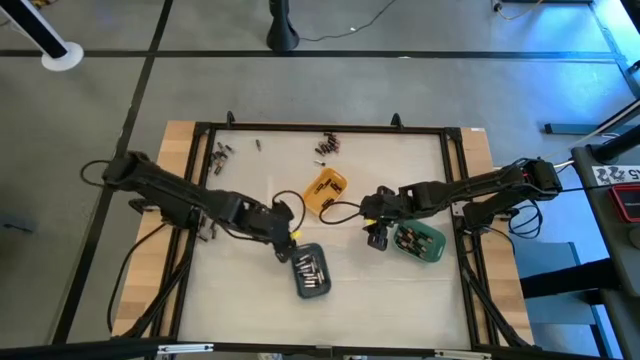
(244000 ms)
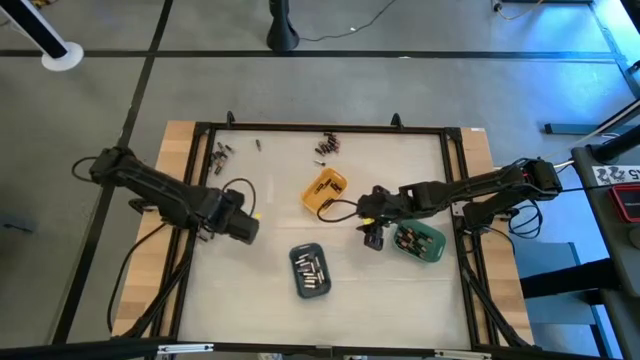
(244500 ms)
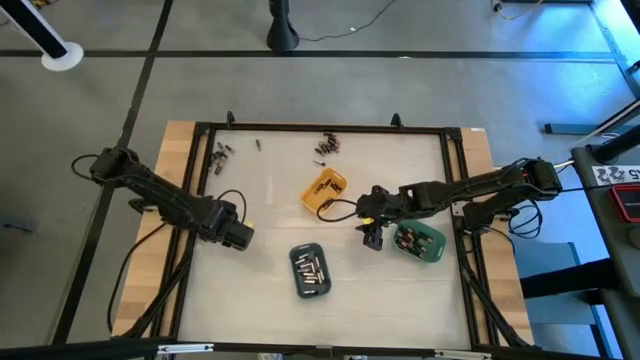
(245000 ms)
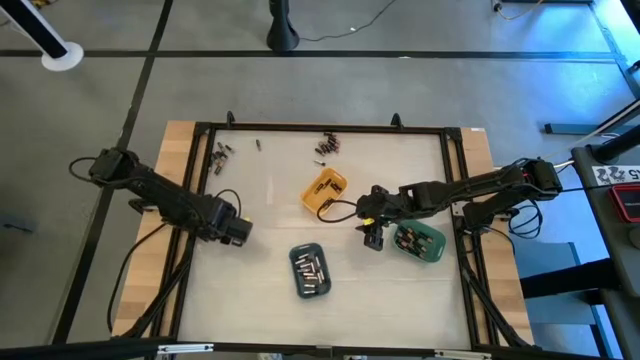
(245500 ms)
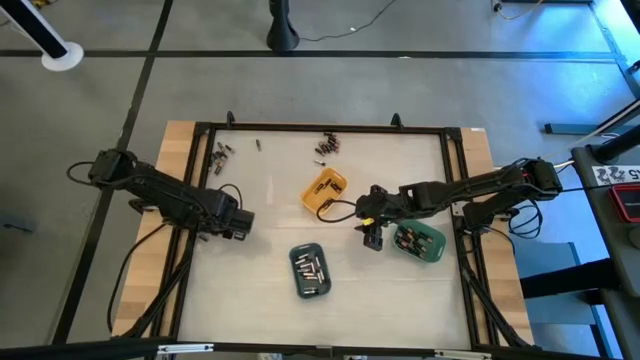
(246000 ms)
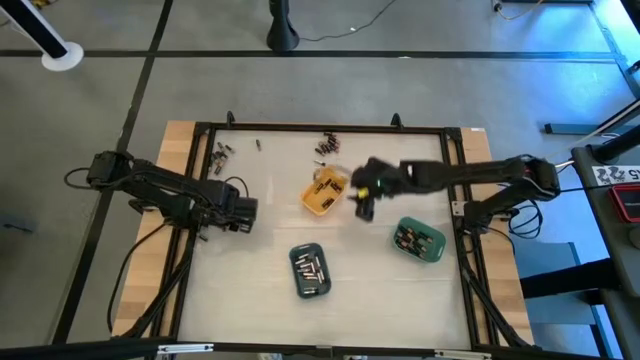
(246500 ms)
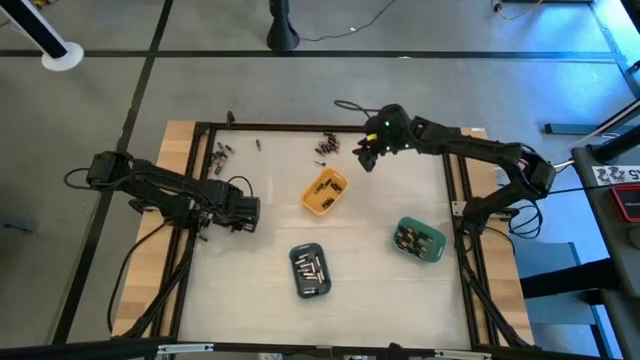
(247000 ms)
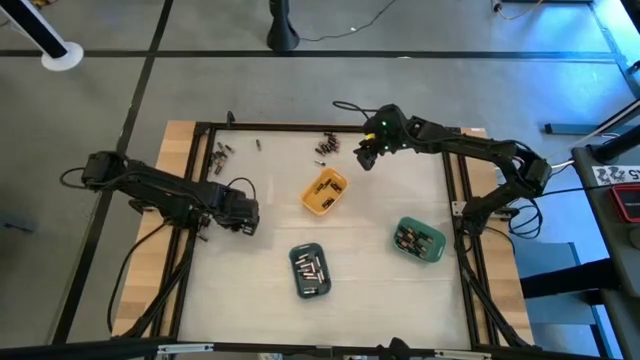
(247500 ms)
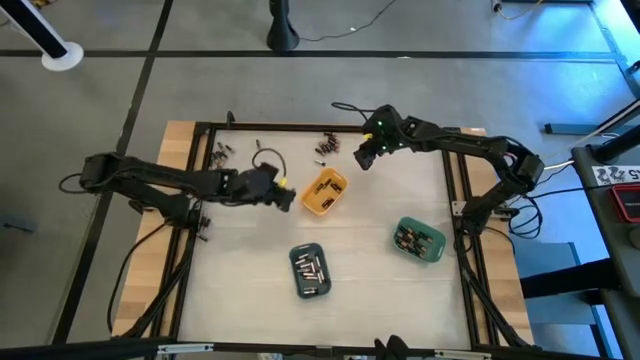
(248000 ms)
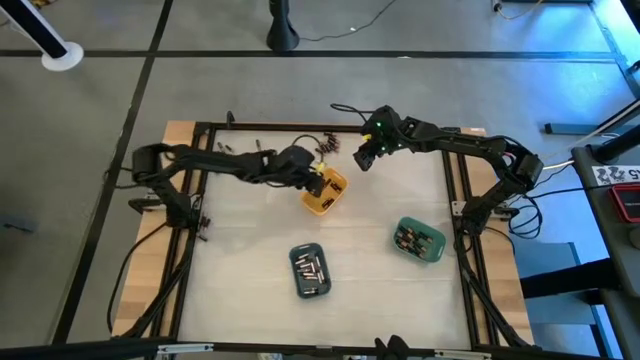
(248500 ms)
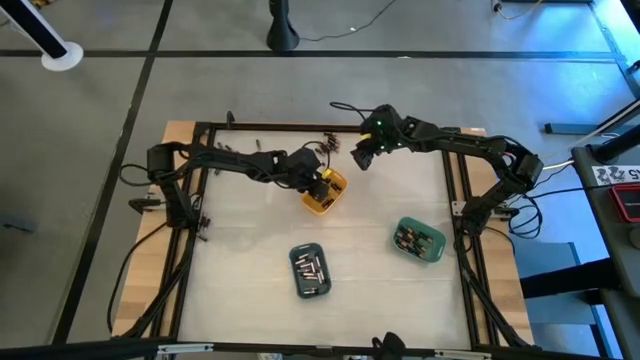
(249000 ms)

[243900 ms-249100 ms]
Task: Sort batteries
Put the black battery into the yellow bin

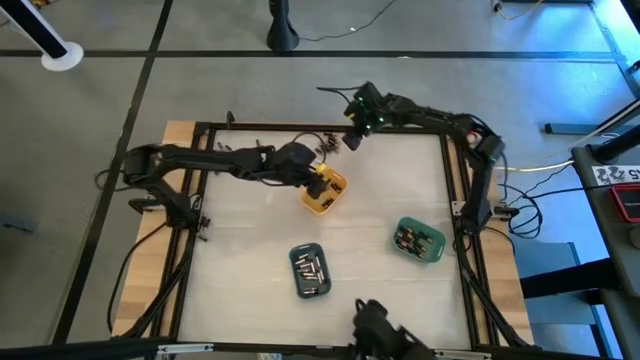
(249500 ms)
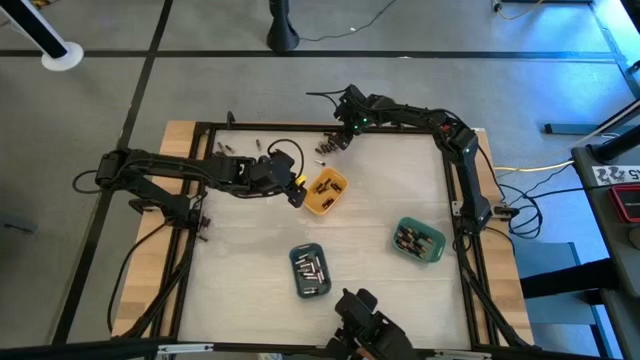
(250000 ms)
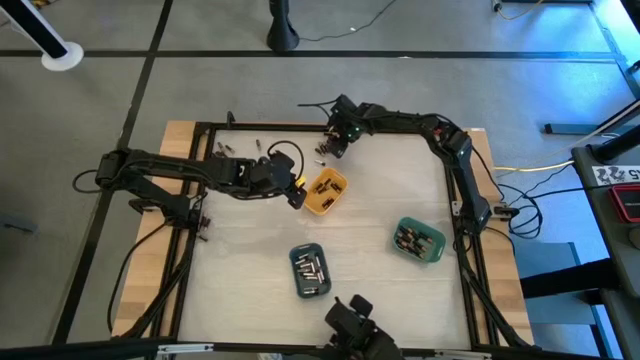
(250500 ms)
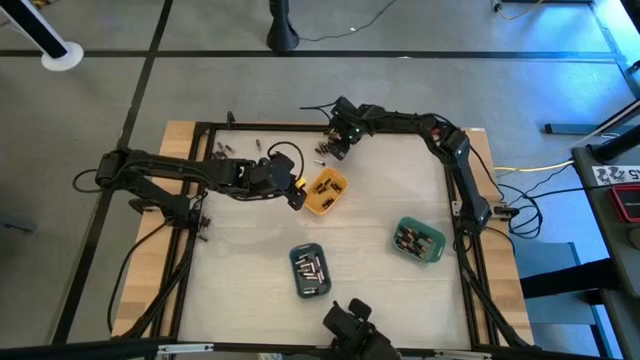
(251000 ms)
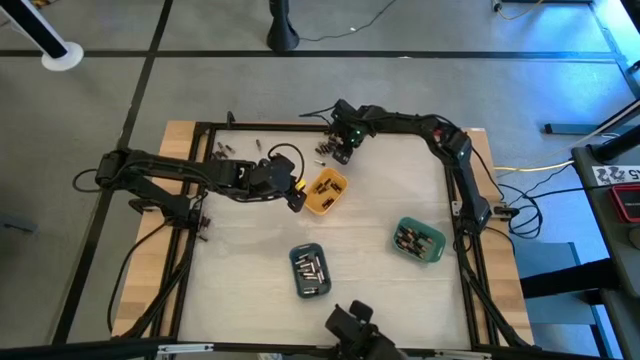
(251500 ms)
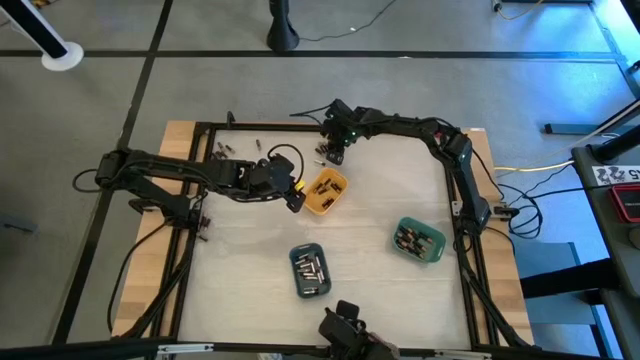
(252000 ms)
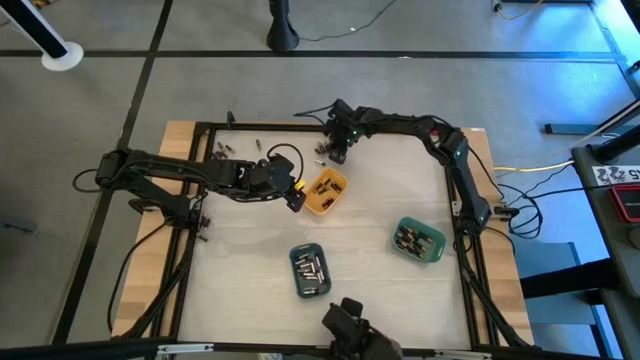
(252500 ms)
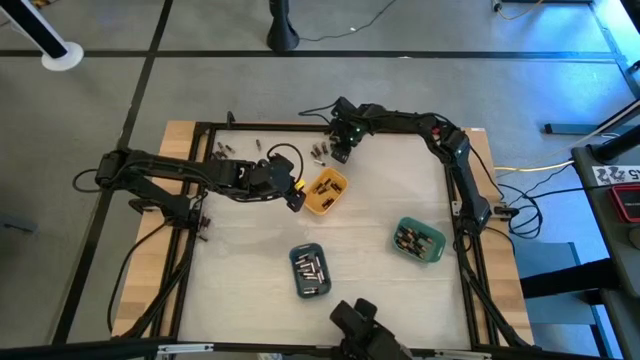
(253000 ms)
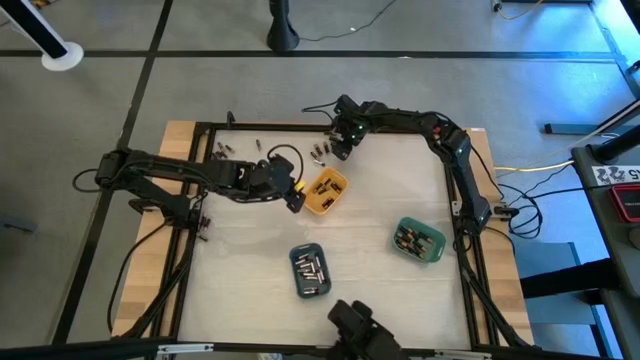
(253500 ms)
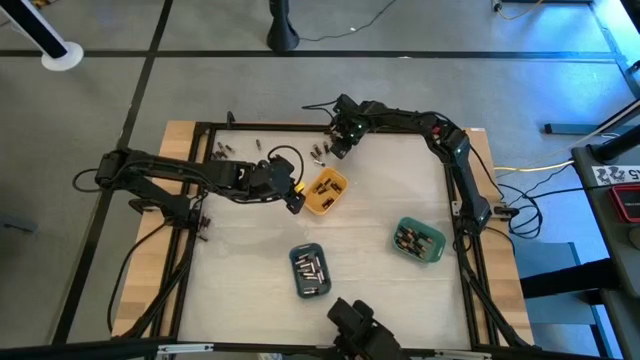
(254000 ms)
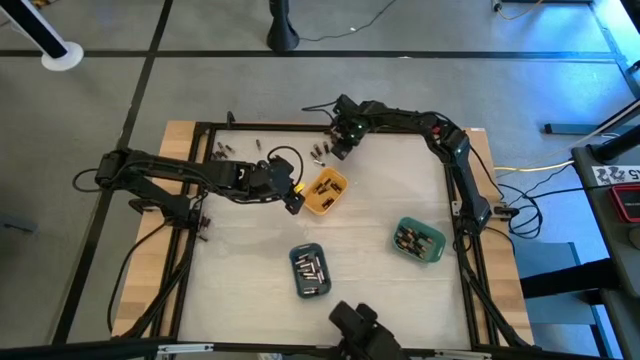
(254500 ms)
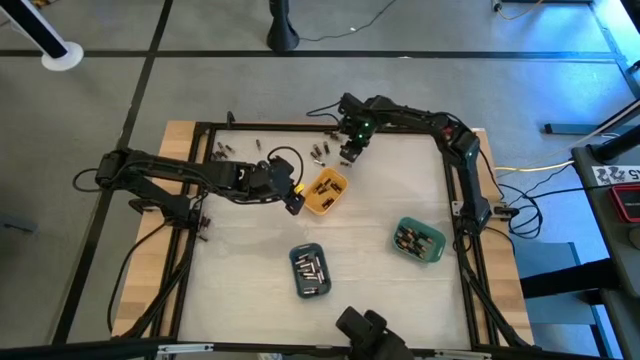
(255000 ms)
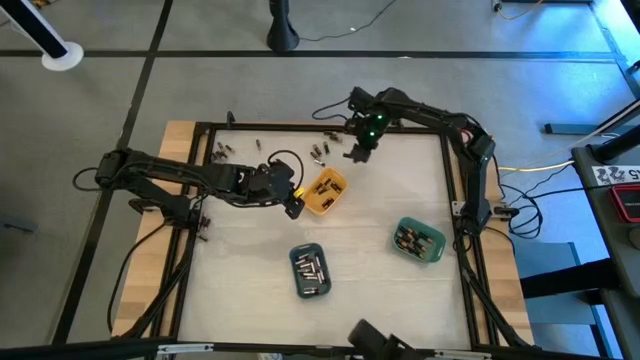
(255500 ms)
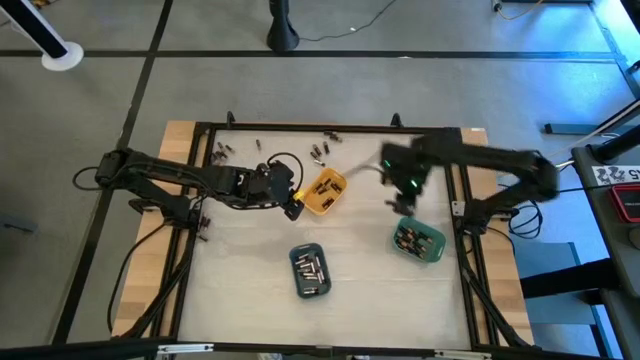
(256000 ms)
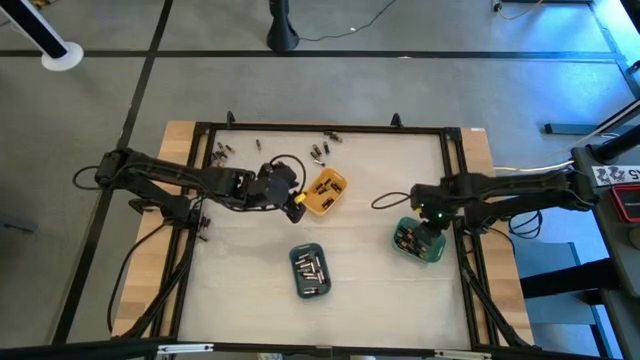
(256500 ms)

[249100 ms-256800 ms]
Put the black battery into the green bin

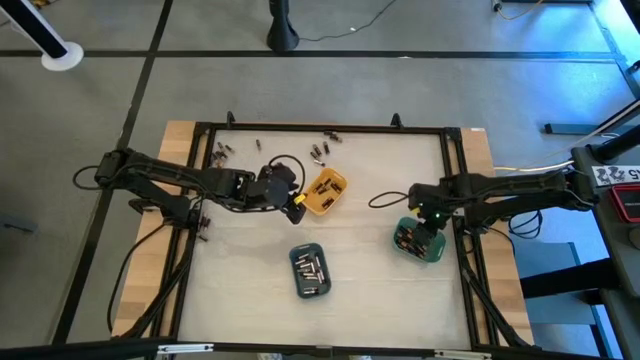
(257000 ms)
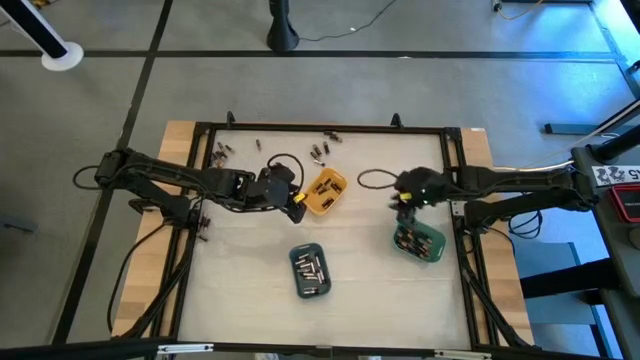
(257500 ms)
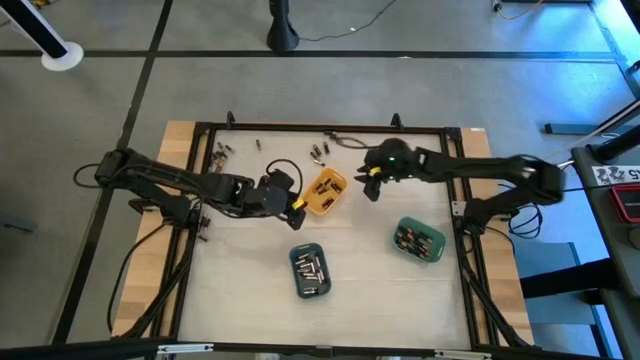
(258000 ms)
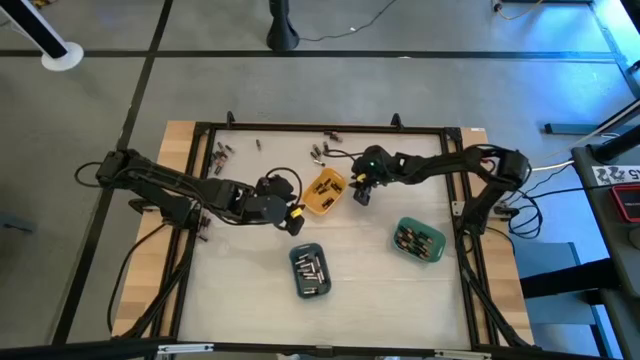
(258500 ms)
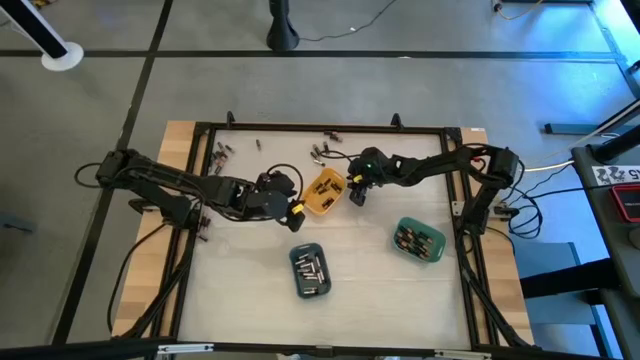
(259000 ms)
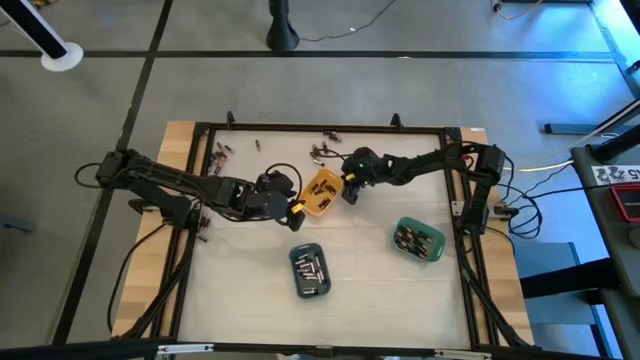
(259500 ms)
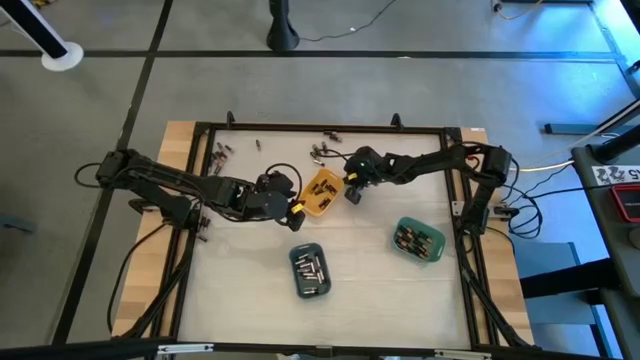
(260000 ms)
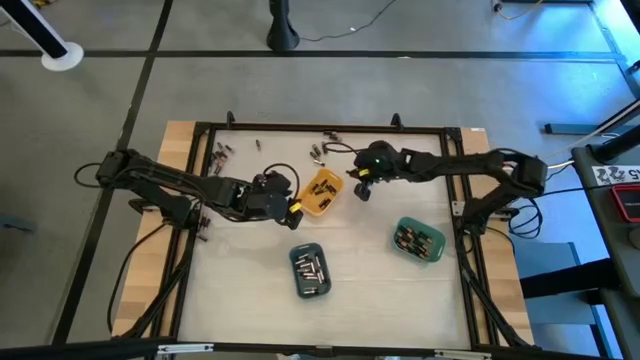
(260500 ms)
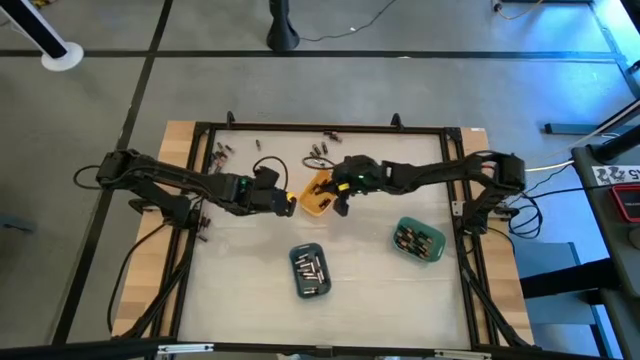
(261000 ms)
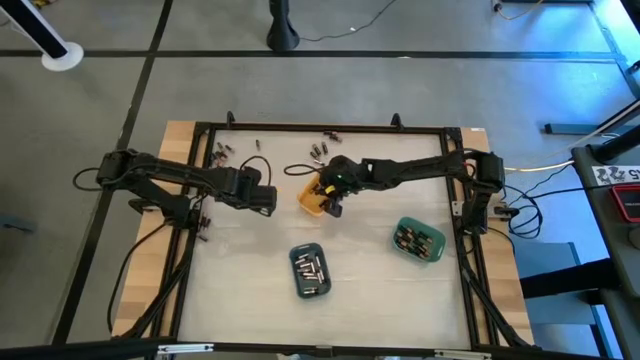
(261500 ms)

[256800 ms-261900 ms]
Put the black battery into the yellow bin

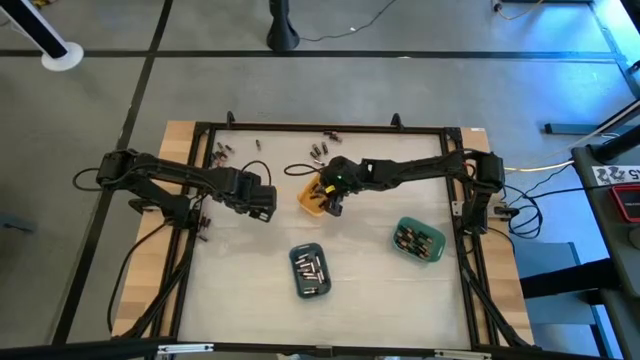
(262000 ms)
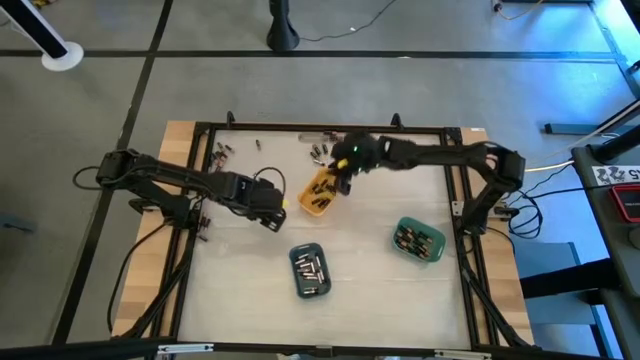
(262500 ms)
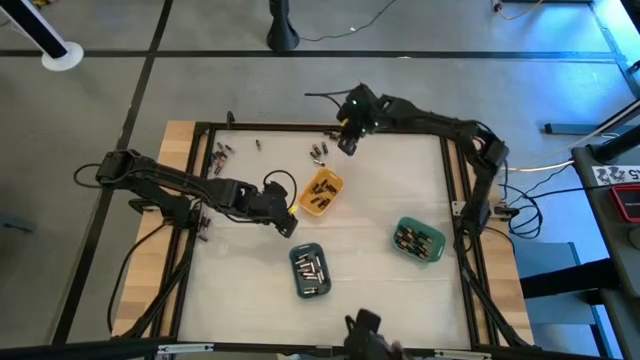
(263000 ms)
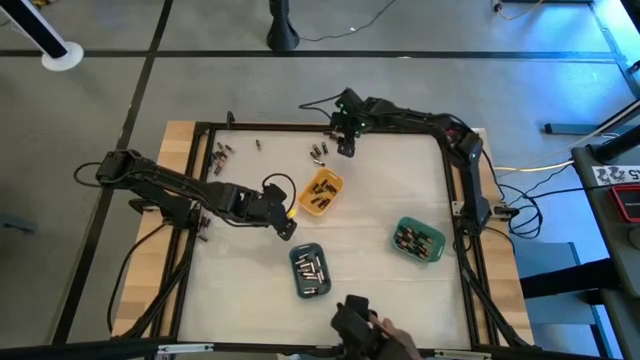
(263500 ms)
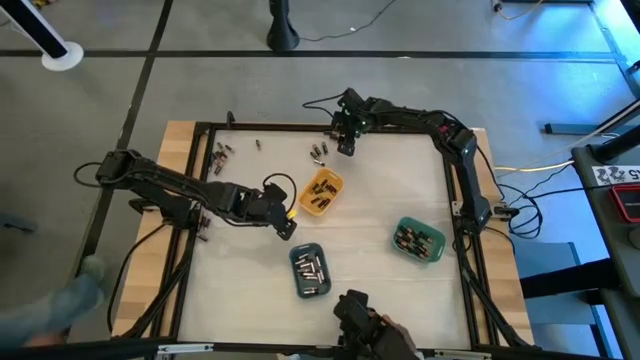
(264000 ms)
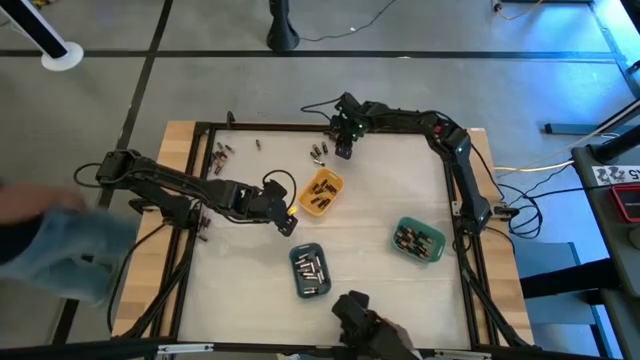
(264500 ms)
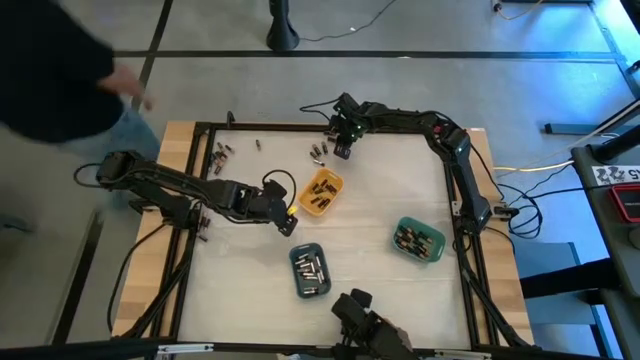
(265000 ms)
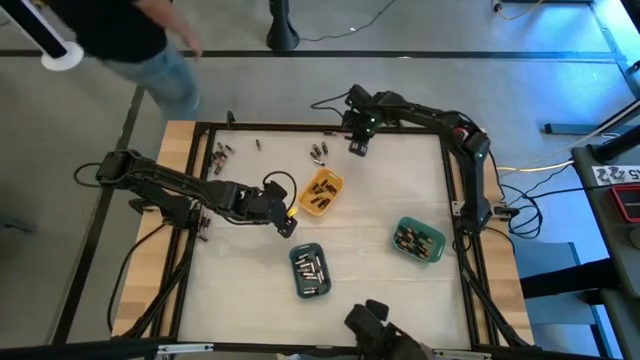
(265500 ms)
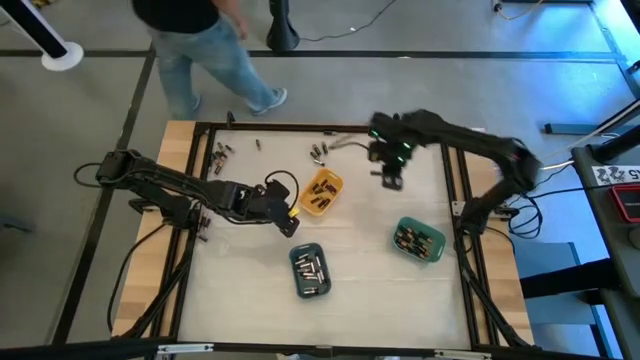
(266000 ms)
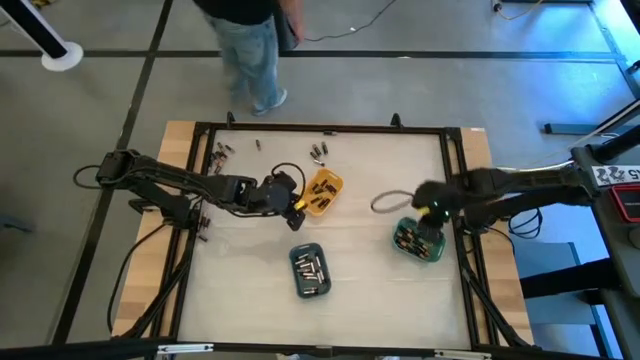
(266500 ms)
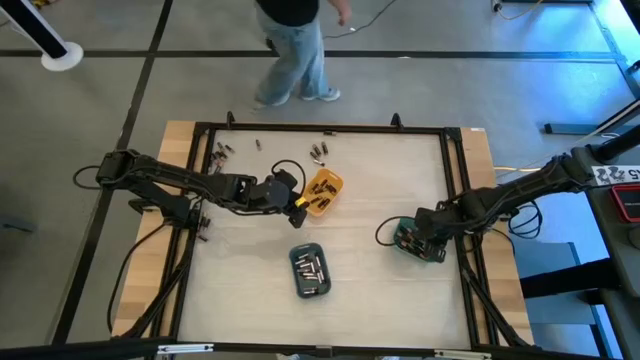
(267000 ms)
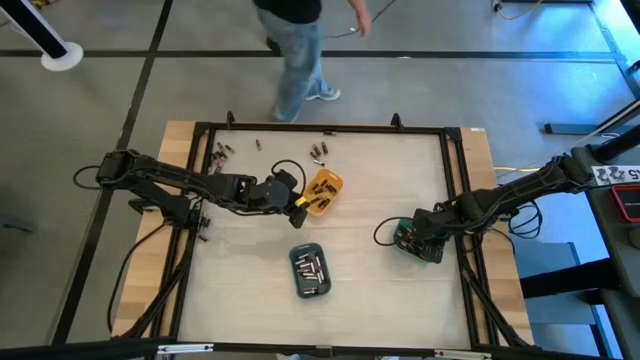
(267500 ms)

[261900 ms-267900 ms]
Put the black battery into the green bin
